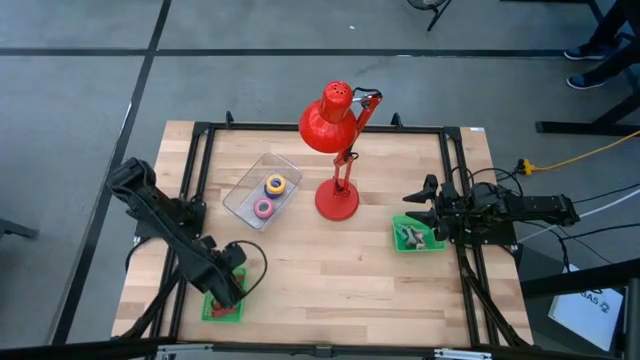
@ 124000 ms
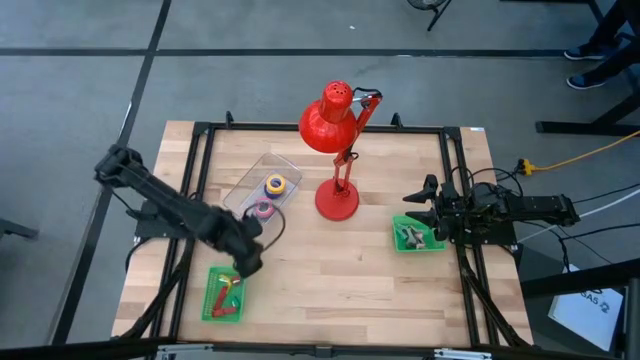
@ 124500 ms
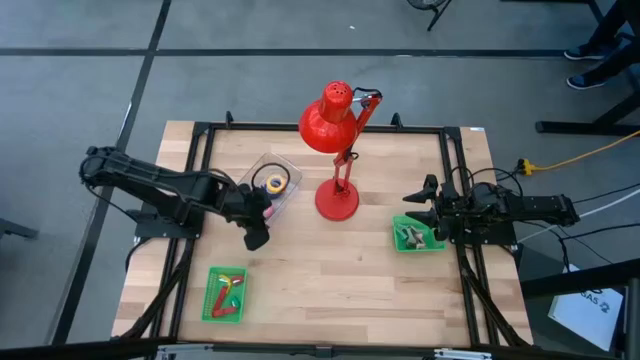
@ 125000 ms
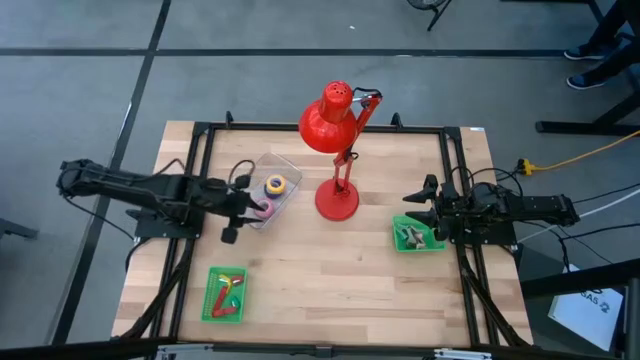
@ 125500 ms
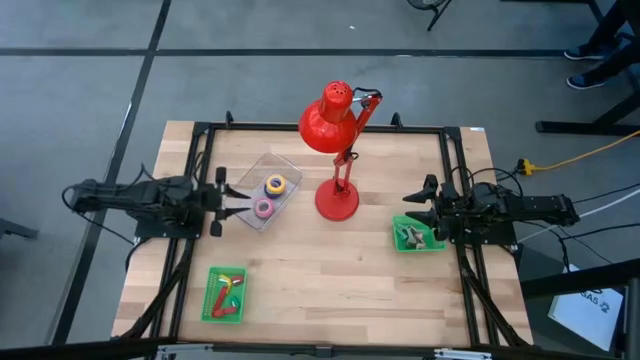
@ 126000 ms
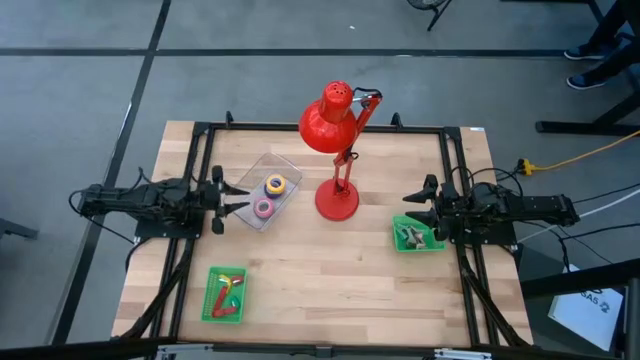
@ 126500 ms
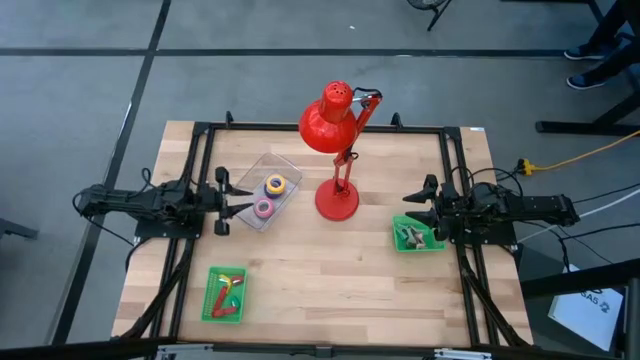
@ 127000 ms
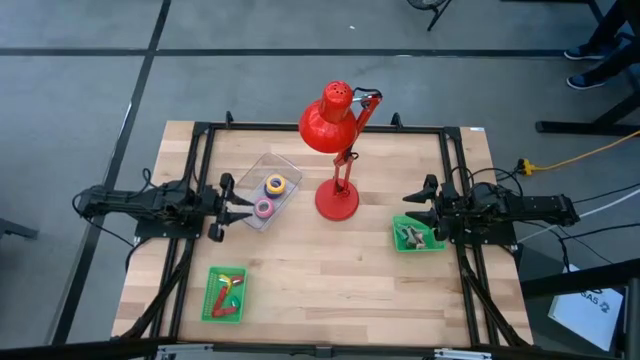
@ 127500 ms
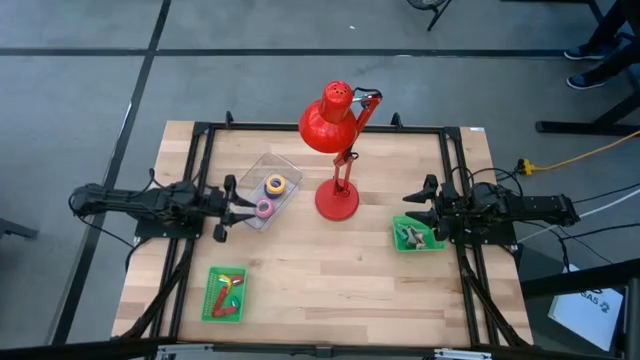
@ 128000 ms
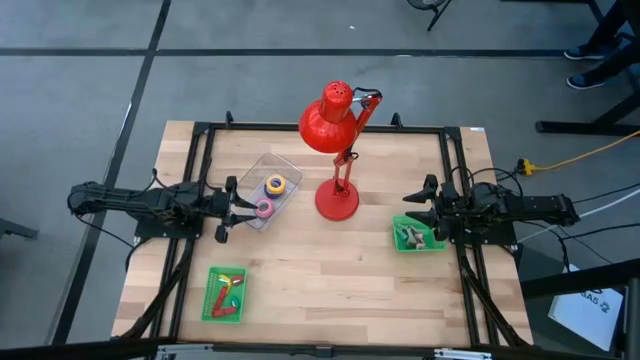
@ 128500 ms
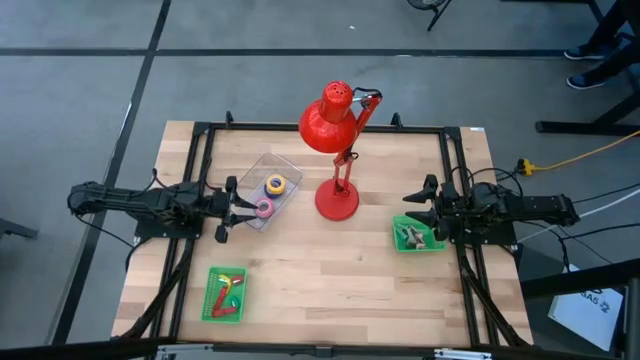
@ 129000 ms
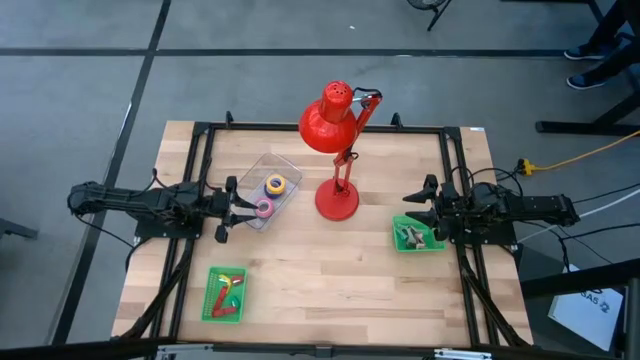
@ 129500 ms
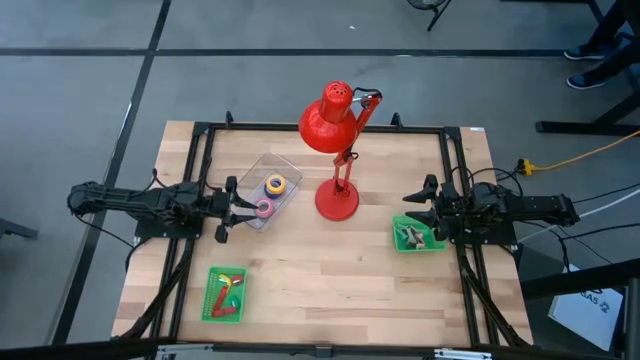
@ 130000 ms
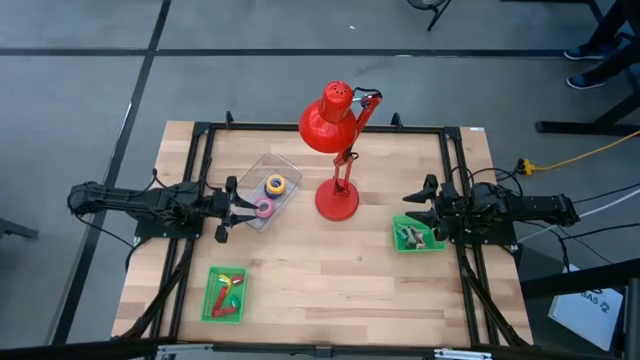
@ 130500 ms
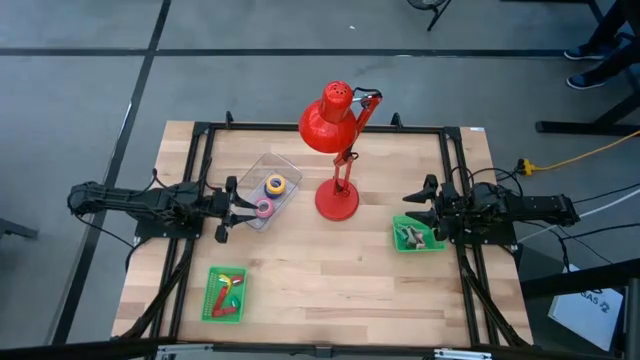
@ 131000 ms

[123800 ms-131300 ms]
Task: Pick and place Stapler, Stapler remover, tape
Return to Home Position

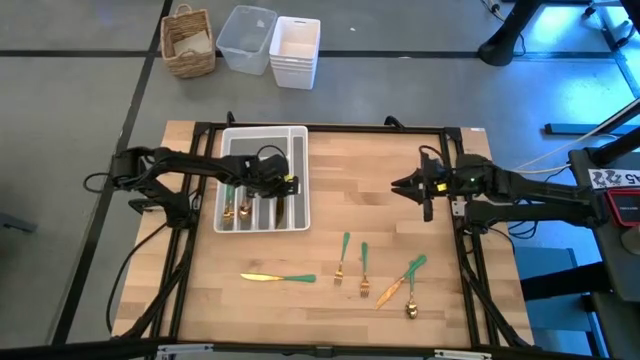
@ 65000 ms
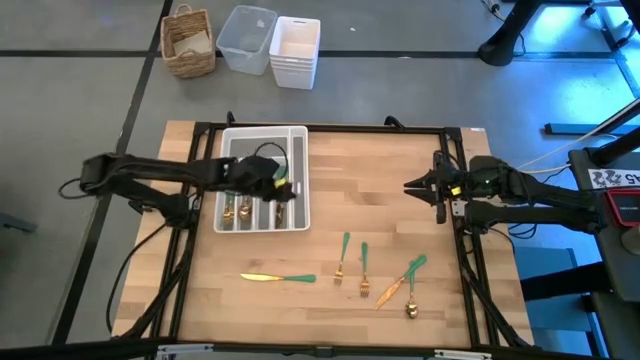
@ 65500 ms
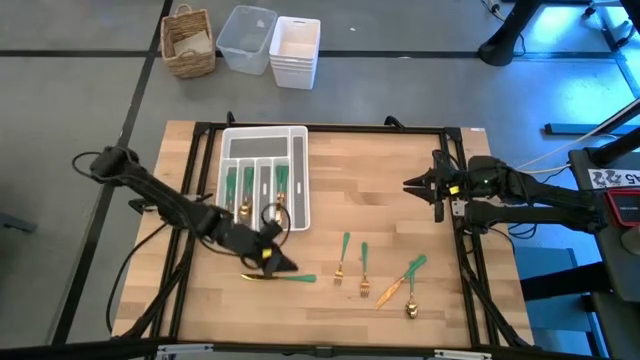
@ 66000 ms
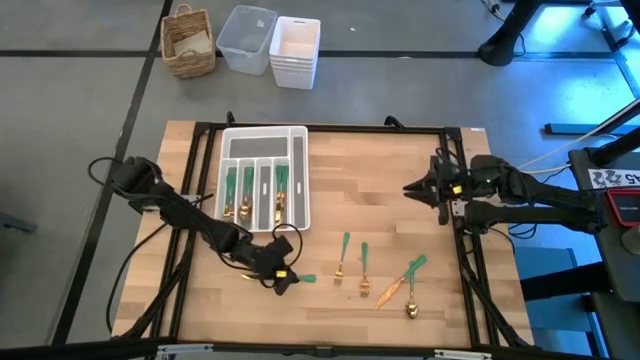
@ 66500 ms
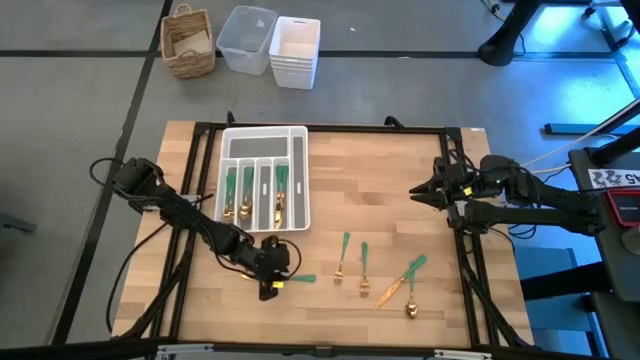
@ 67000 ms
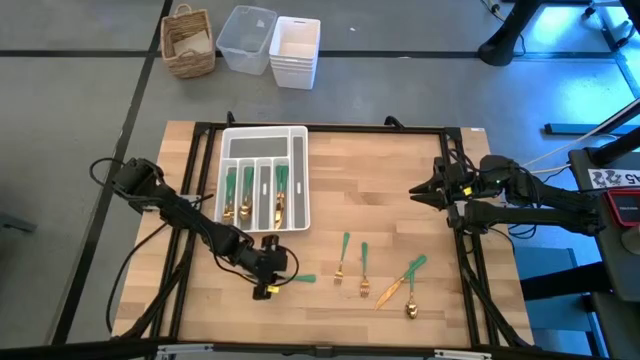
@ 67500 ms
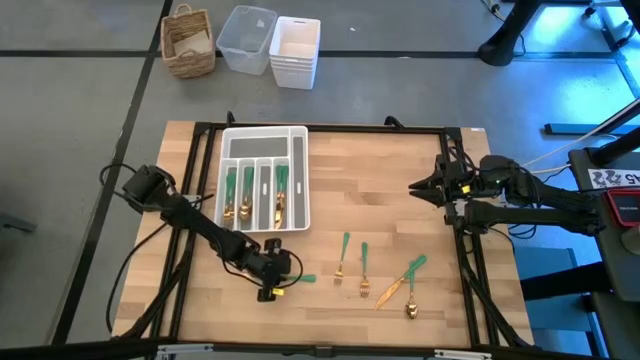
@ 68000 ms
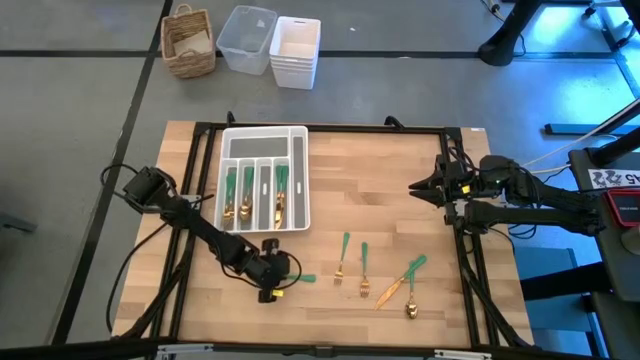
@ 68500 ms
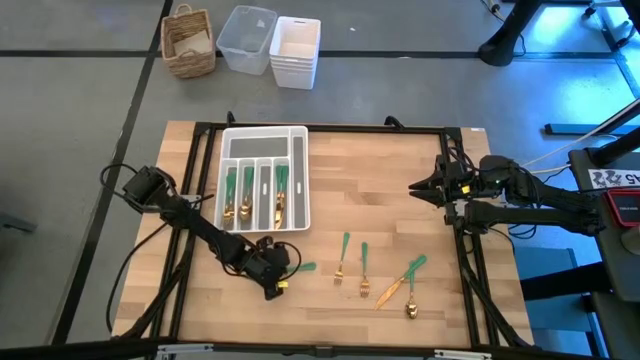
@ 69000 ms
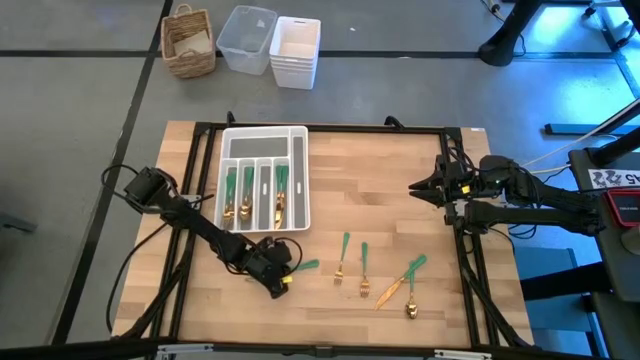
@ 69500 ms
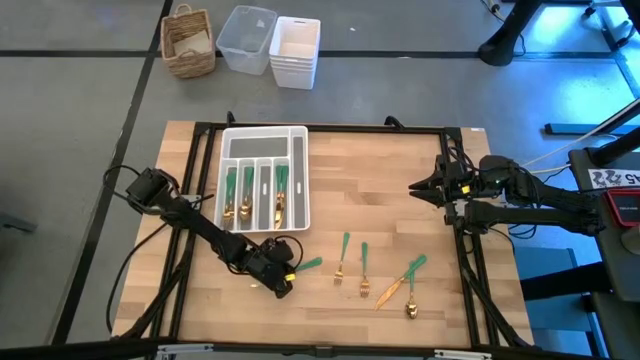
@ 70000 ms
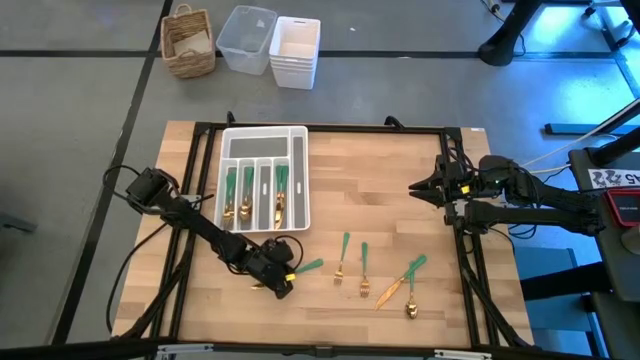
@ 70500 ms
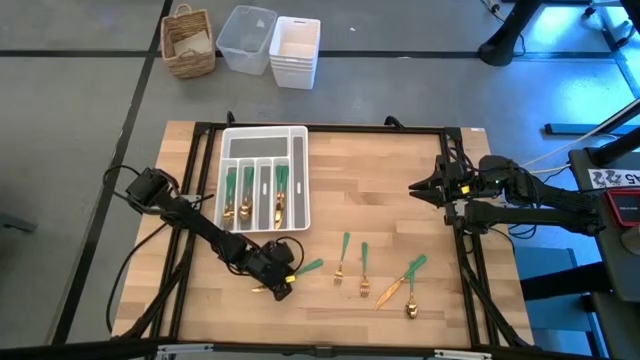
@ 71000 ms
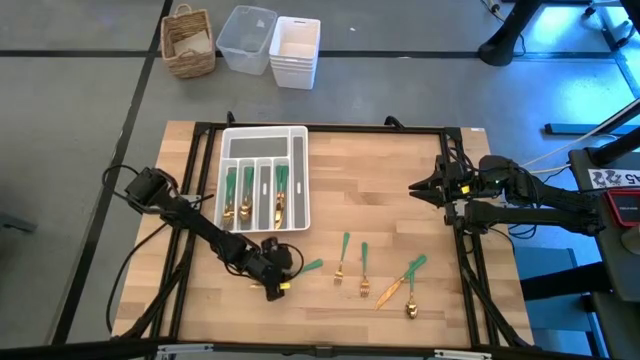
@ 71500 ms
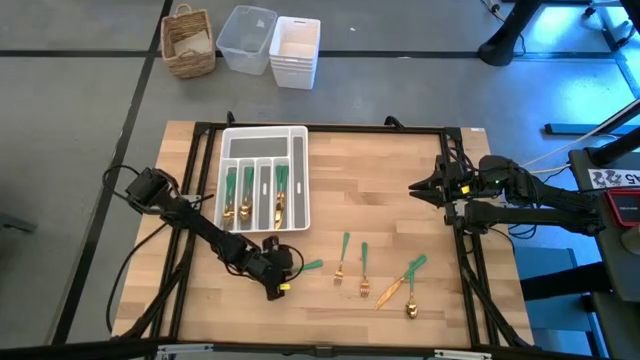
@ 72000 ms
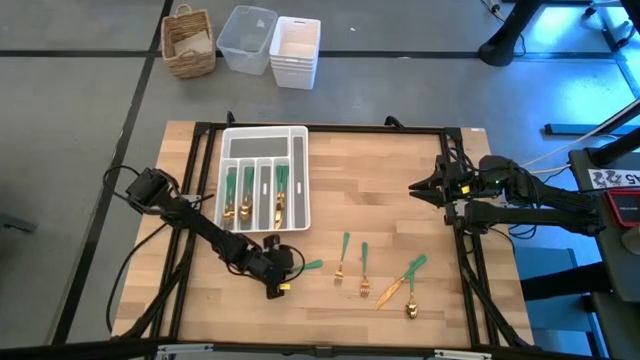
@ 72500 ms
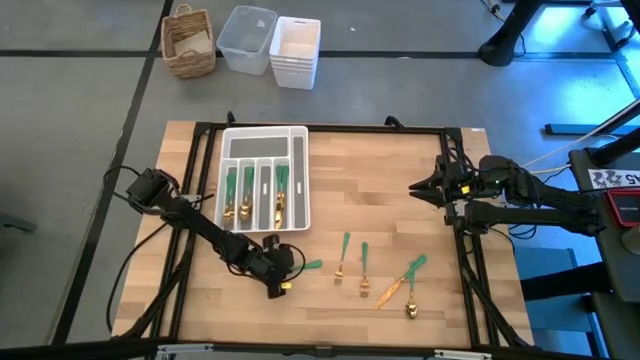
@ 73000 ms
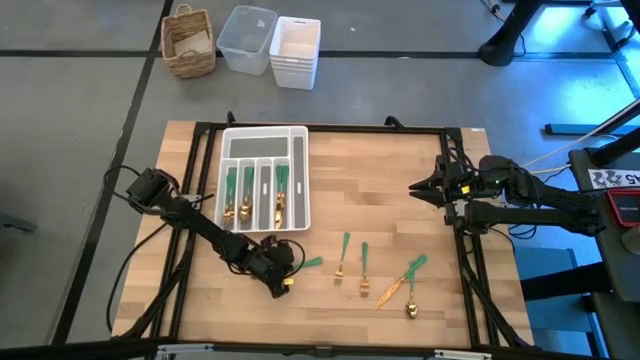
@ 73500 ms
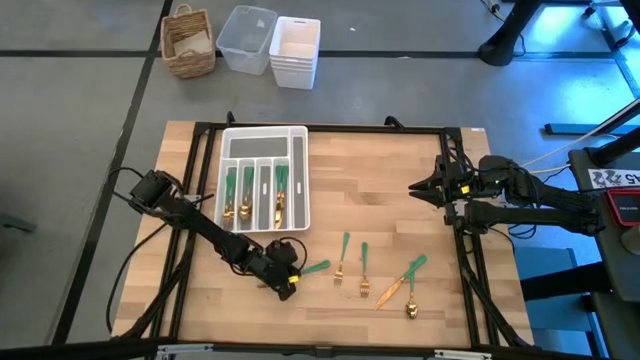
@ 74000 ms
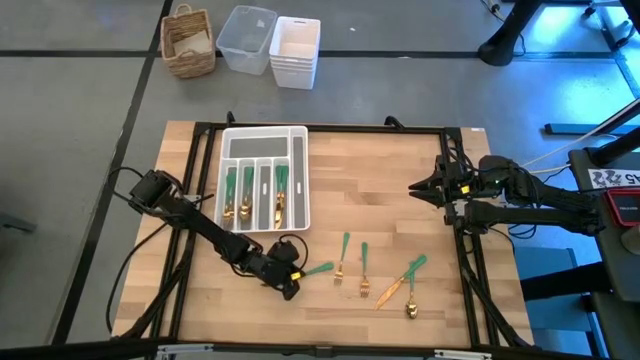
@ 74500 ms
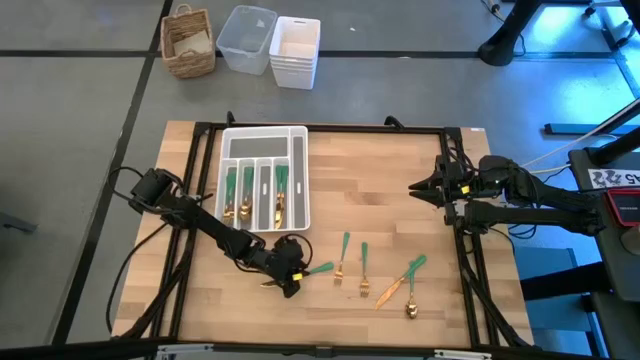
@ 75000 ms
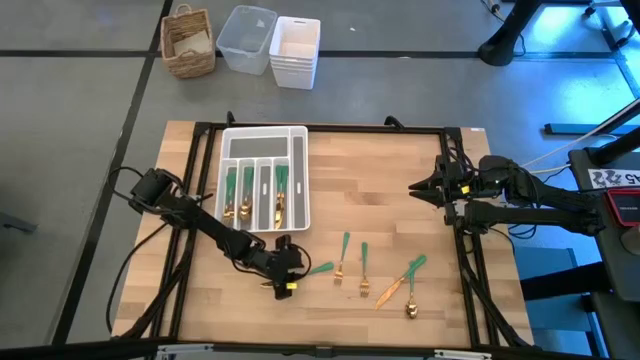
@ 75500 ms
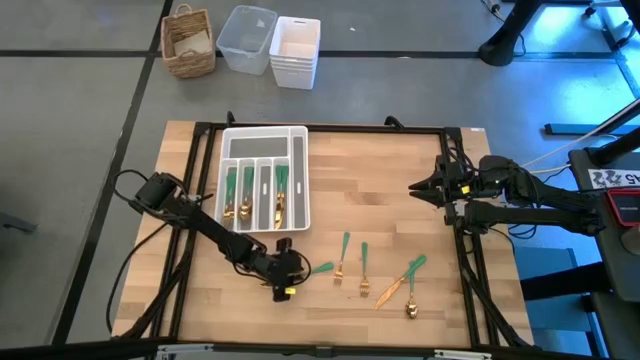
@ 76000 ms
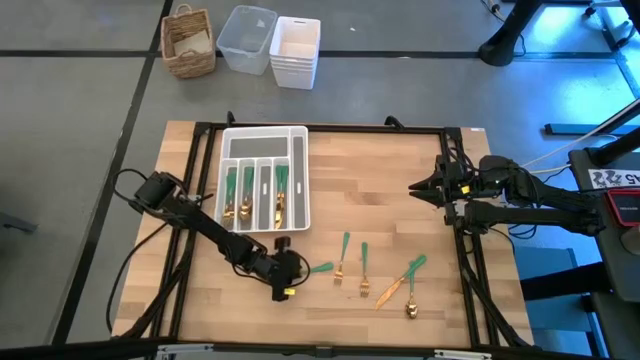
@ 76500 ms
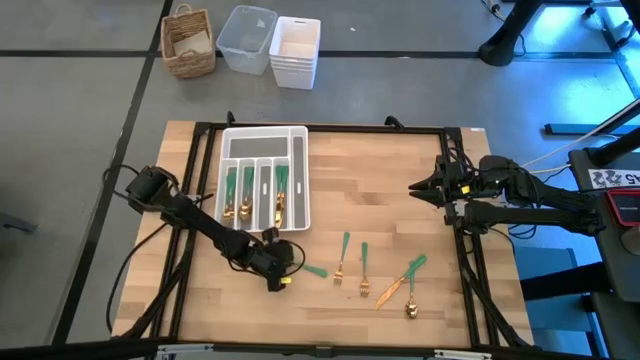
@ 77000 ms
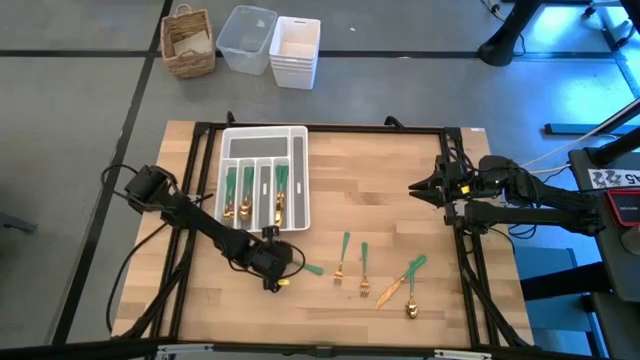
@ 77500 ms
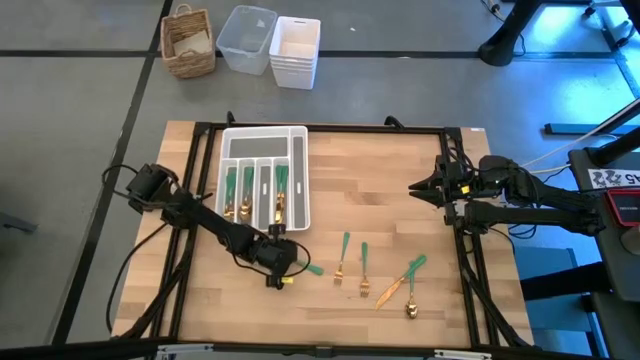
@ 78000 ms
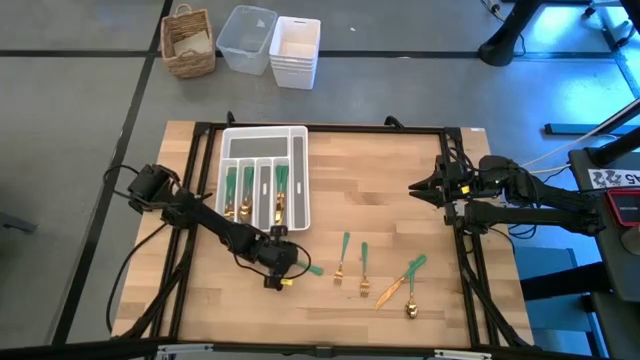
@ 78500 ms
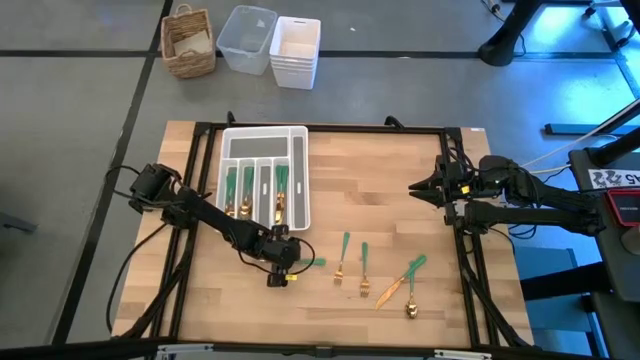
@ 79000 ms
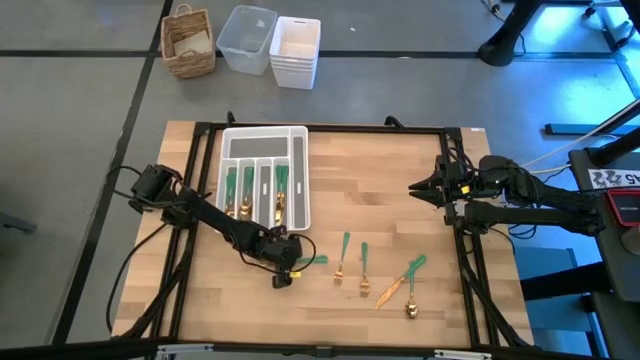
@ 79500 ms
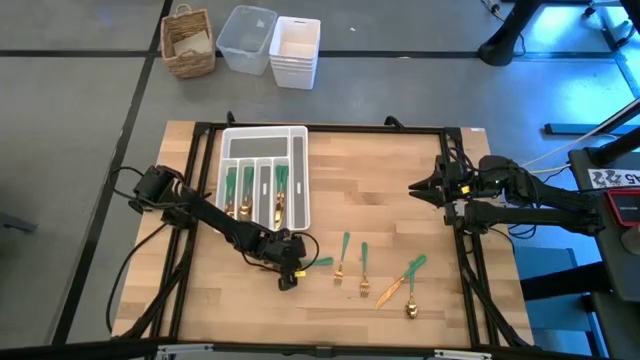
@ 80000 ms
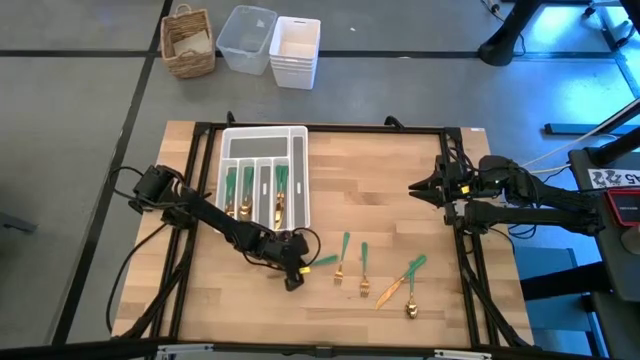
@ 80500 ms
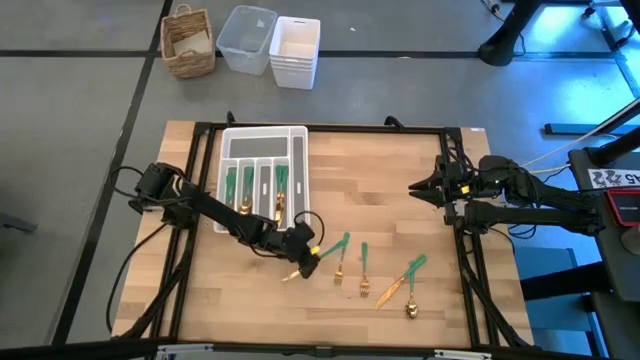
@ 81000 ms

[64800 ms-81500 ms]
Task: Sort silverware
Put the green knife into the white silverware tray
